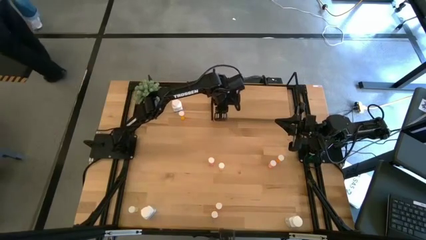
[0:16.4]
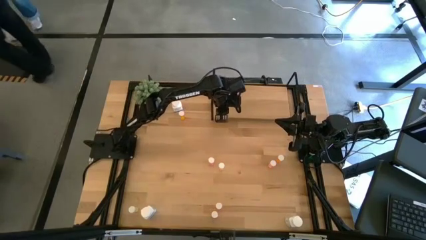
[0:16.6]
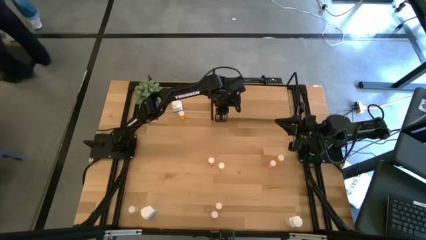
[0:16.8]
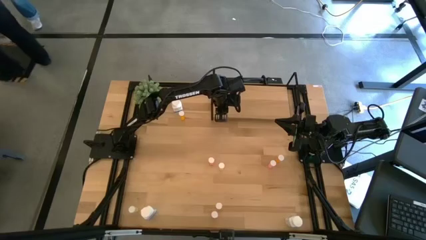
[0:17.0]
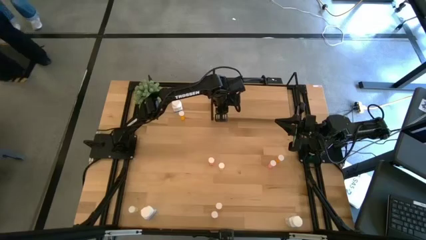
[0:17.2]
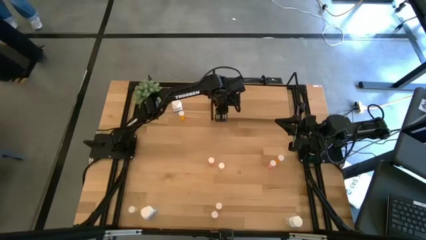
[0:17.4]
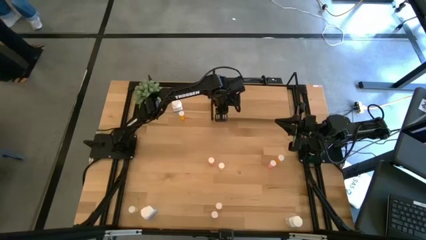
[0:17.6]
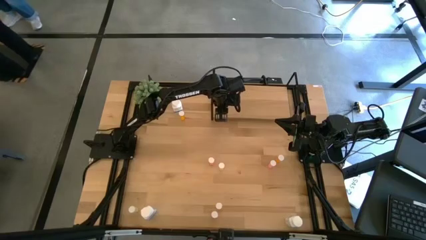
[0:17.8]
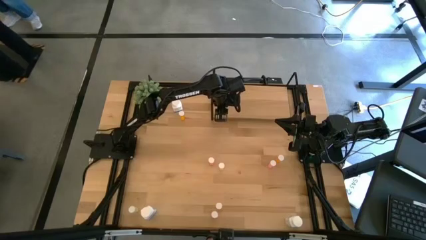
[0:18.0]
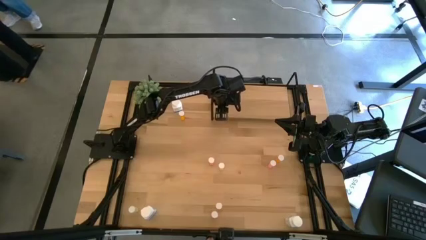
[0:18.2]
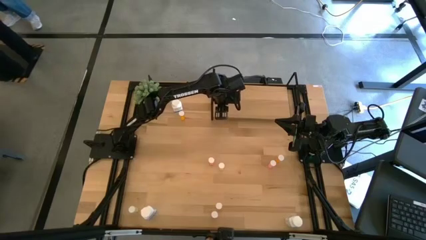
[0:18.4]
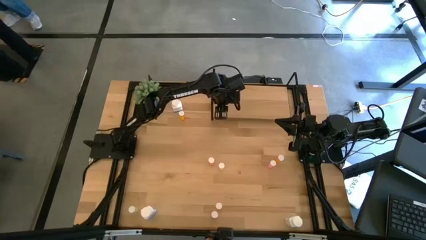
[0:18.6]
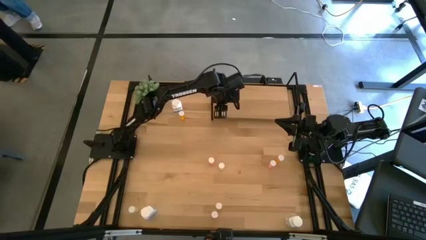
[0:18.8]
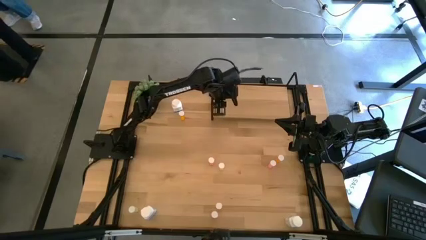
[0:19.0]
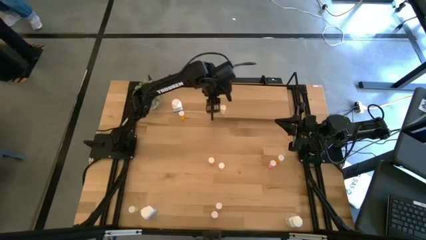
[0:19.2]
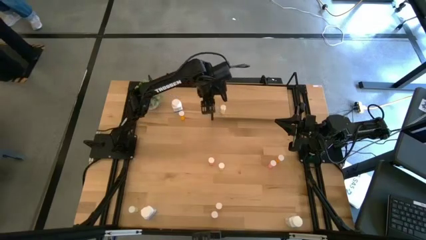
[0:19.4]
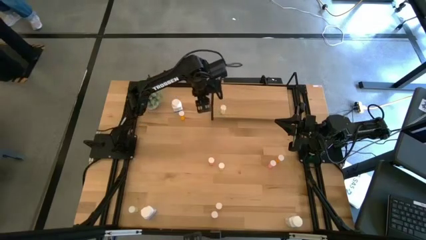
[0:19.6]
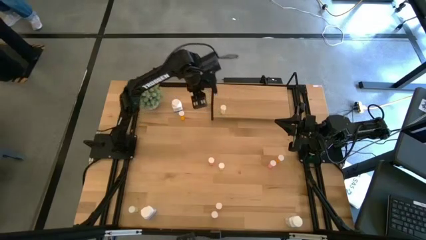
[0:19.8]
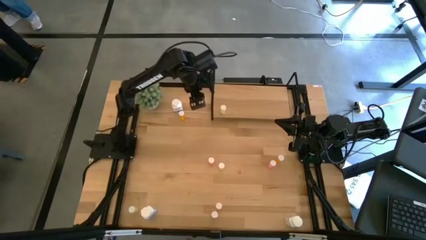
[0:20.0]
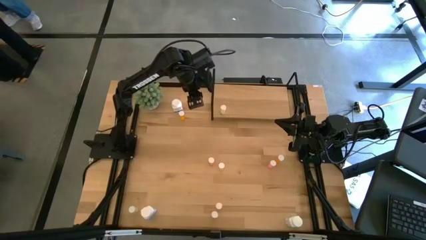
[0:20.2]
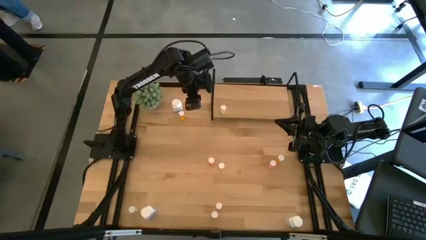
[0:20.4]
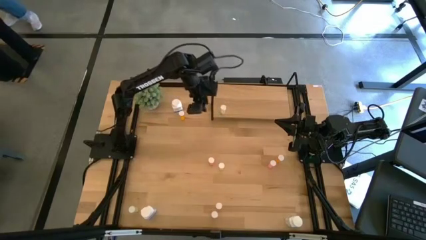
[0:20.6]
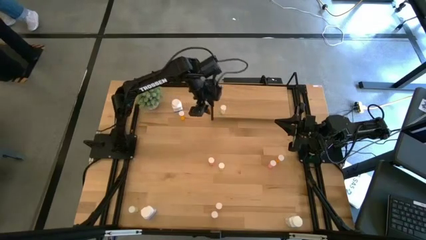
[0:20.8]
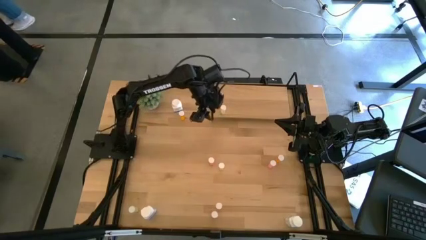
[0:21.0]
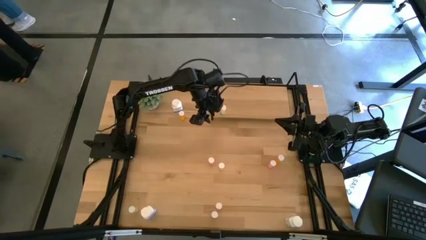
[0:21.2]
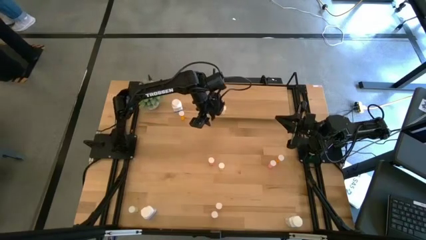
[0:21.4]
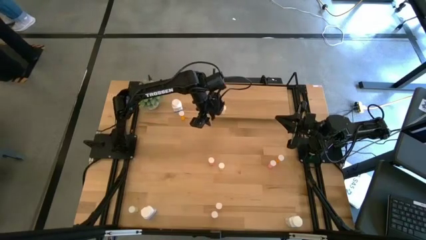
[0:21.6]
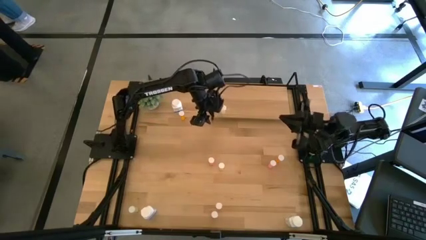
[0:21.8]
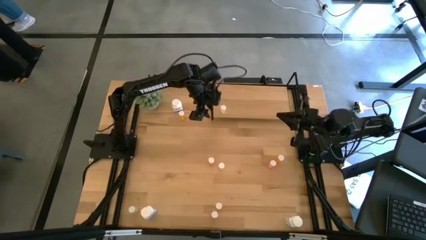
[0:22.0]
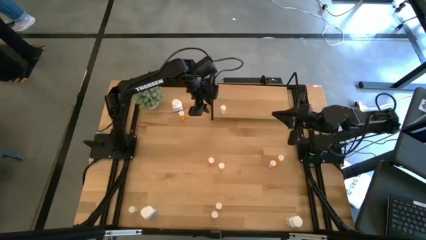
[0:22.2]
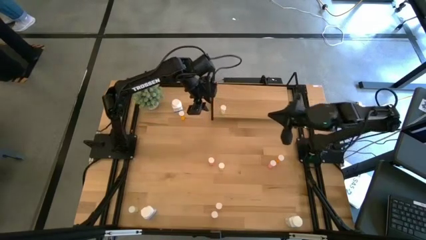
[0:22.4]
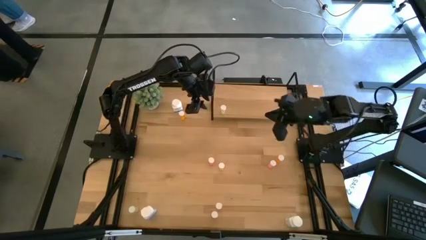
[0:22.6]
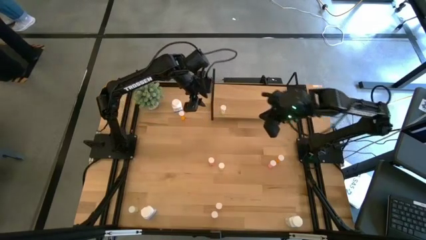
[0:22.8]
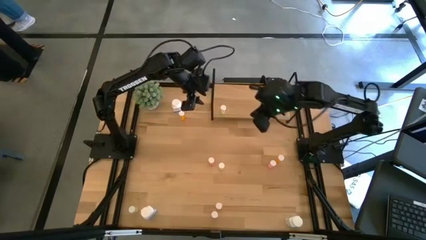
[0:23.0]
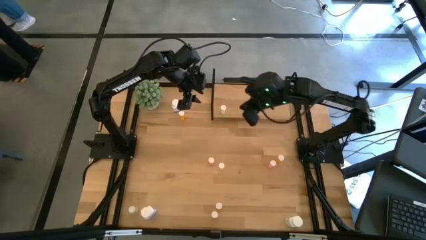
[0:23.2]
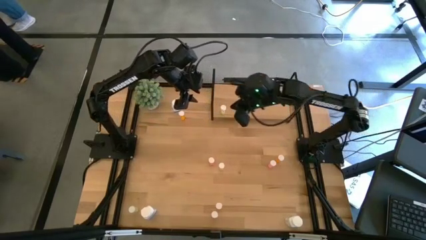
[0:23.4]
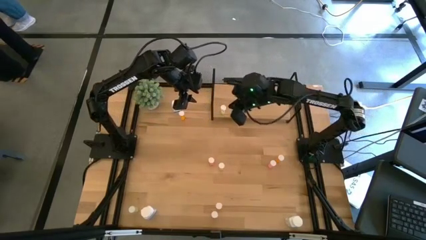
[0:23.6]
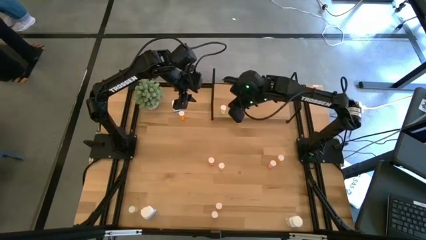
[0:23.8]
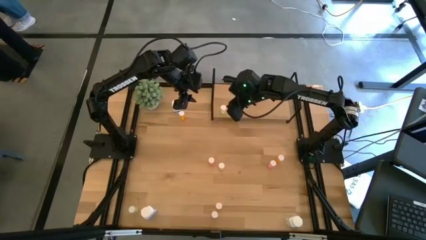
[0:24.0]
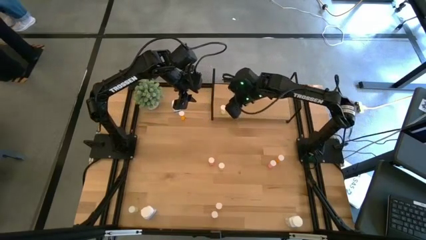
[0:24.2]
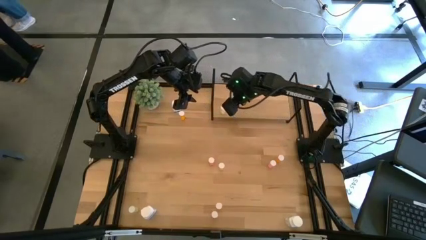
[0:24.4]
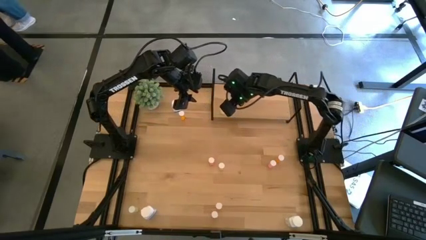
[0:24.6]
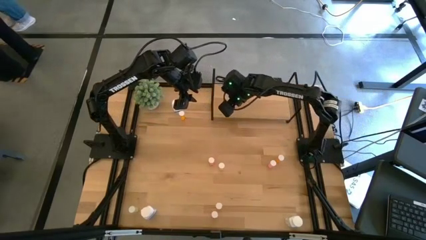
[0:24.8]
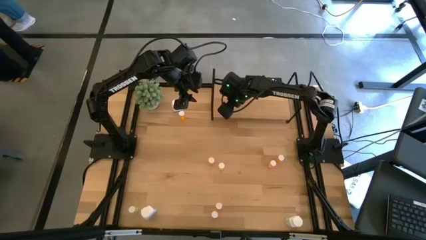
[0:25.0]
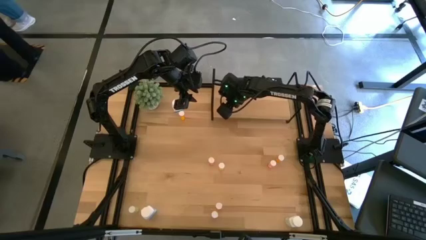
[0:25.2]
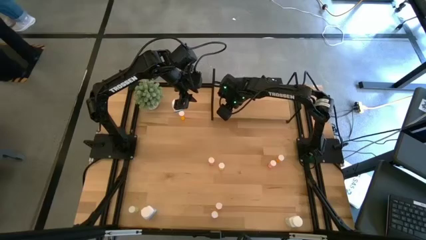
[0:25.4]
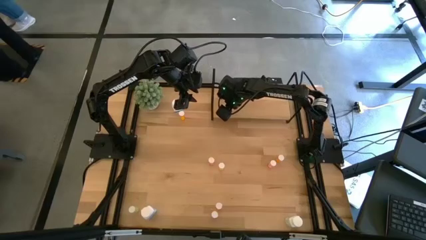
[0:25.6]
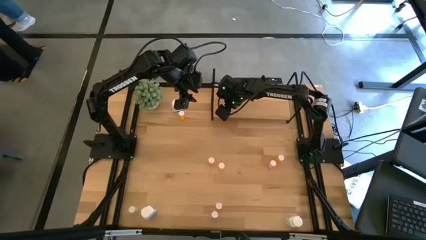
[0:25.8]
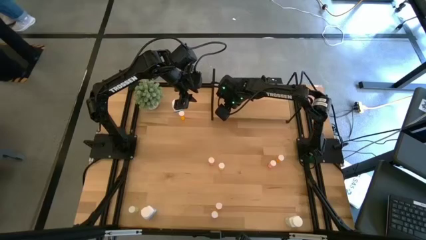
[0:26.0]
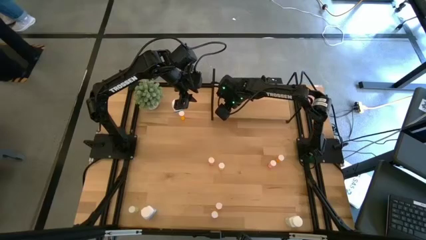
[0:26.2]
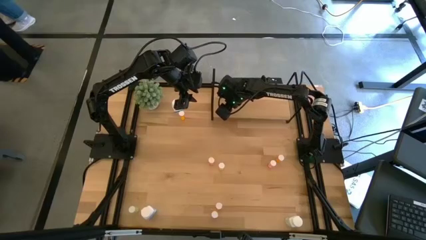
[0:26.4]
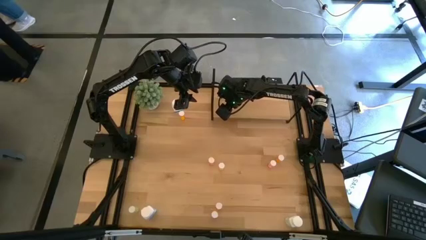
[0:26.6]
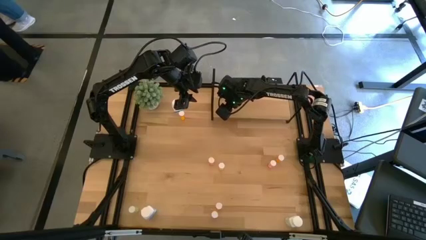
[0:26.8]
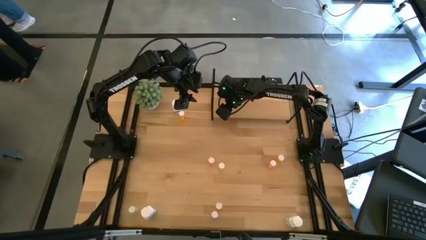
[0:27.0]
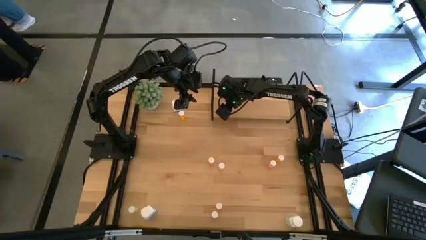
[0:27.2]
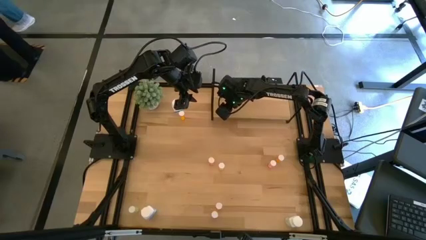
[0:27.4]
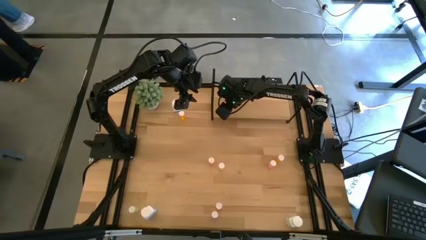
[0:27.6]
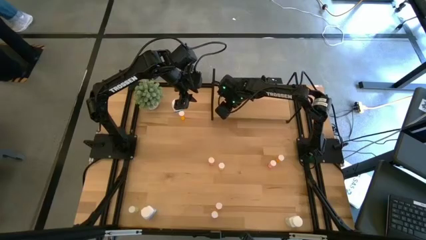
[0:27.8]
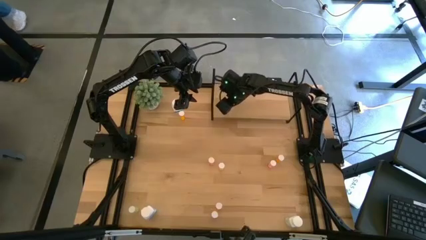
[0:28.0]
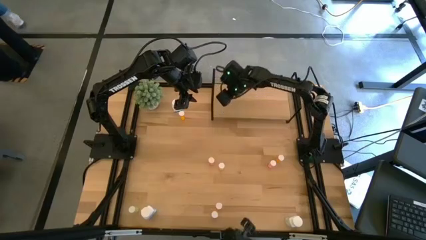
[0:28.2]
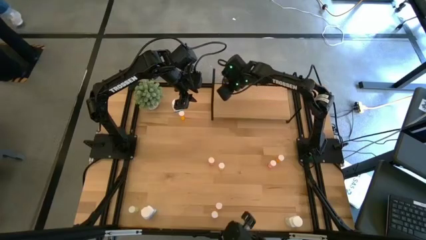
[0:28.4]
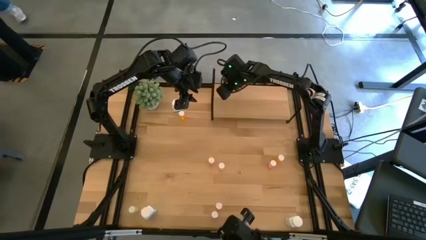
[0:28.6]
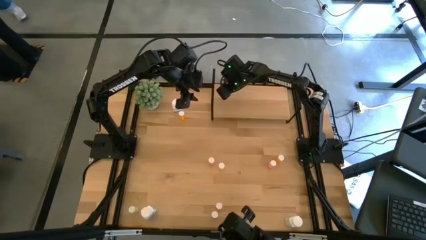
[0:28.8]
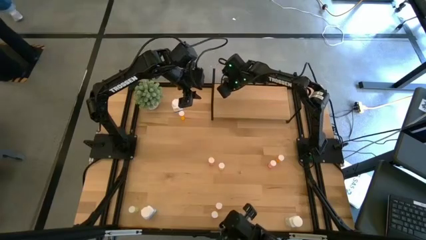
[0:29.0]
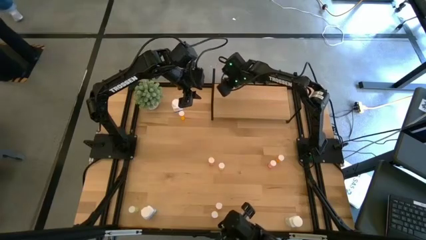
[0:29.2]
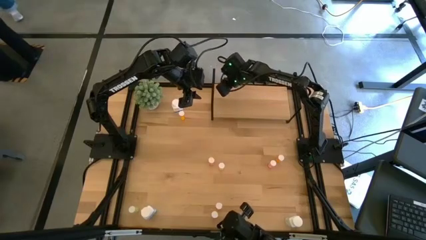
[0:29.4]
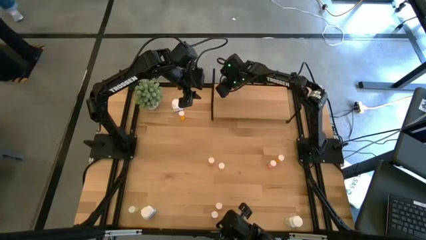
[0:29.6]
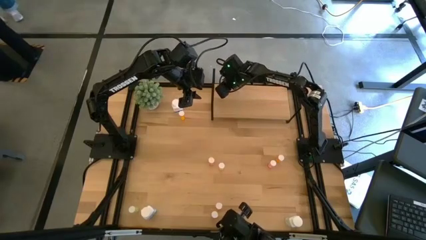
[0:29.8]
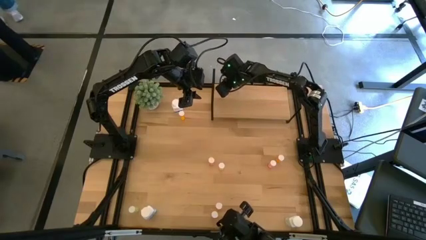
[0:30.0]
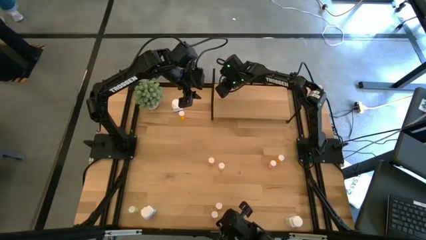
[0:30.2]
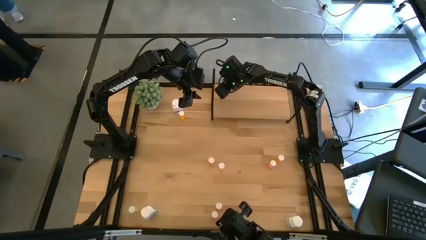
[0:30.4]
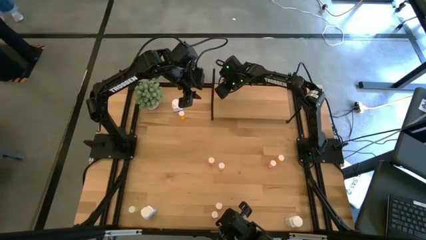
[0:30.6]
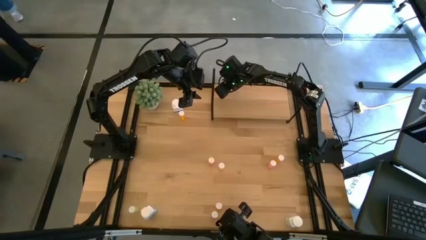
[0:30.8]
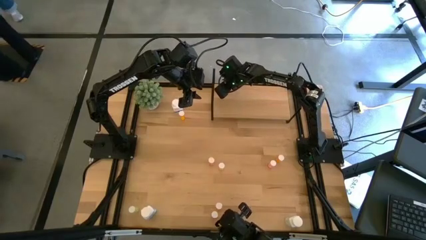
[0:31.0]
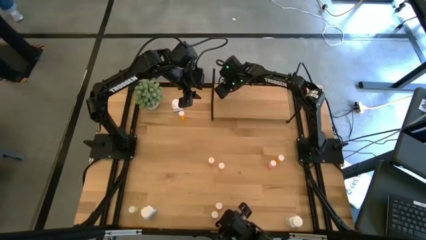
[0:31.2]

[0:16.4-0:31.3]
Task: Pick and place medicine bottles onto shelf by color
Put the top left yellow pill bottle on the shelf

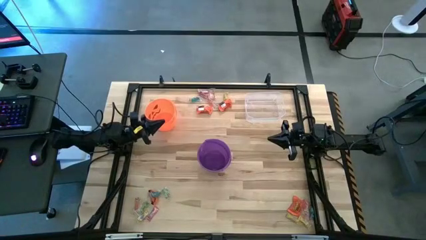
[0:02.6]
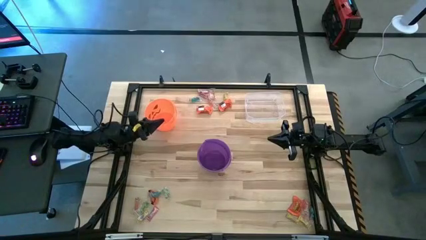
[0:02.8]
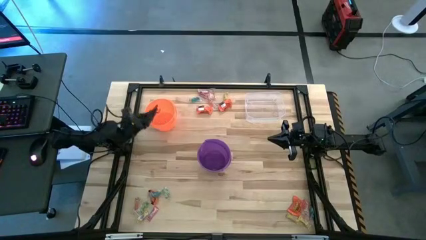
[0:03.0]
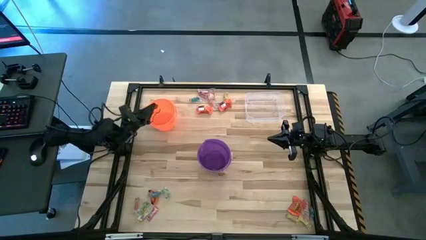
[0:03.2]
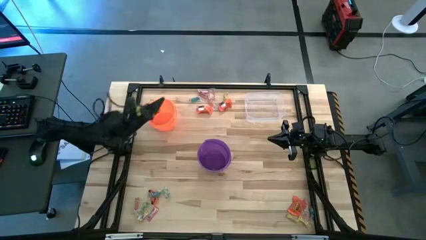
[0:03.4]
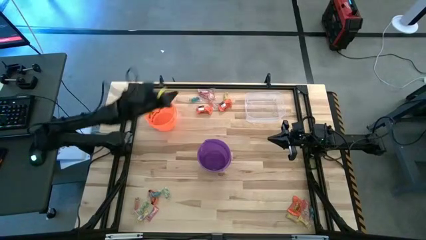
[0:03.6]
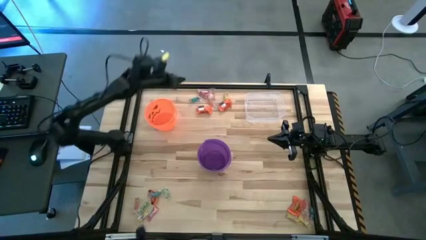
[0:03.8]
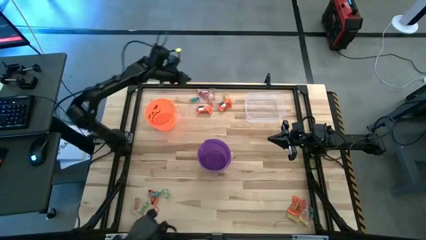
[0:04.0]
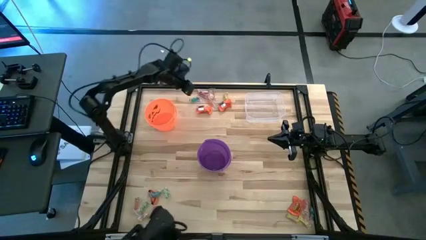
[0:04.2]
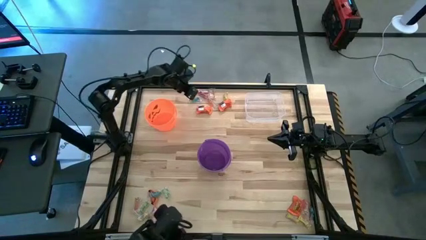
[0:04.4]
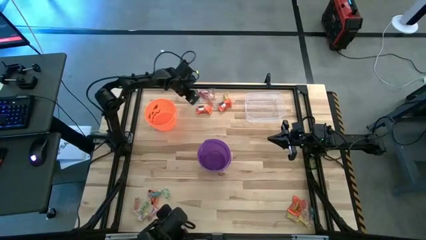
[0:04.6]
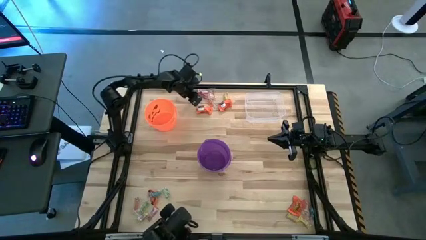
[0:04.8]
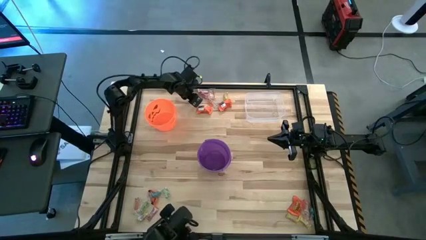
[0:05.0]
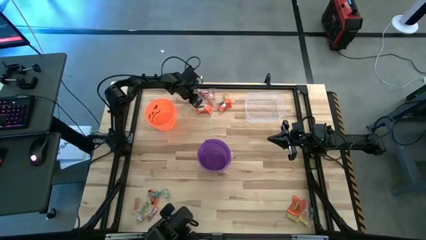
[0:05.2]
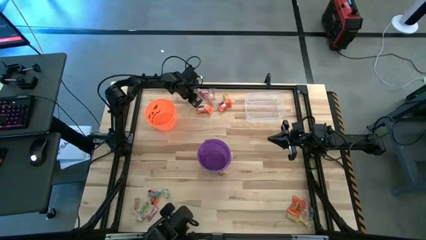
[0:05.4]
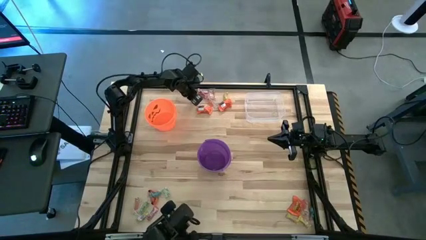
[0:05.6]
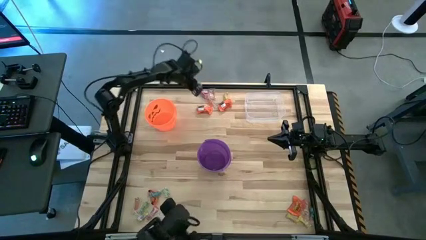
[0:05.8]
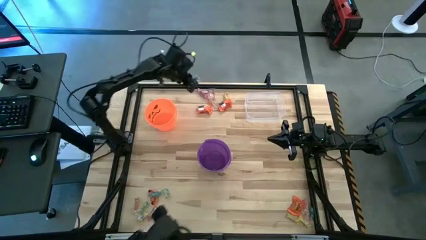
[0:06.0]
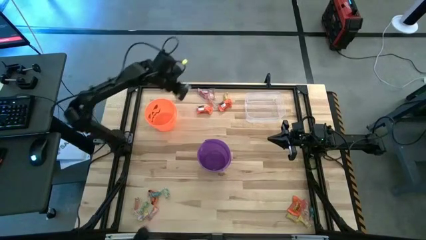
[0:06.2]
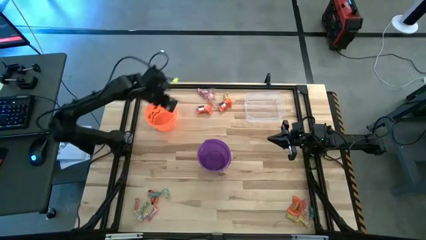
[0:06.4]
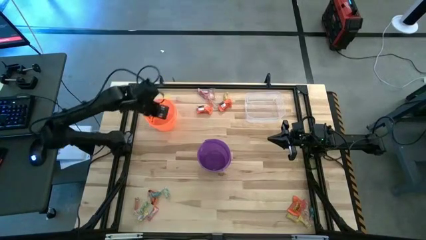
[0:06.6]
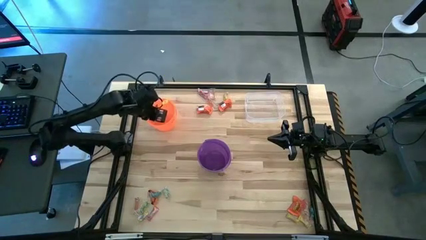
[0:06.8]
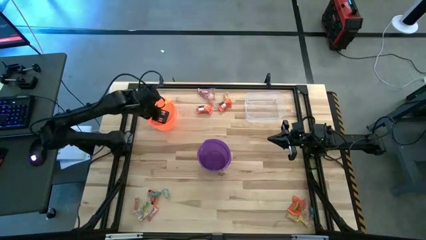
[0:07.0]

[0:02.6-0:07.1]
Task: Sort candy by brand, put in halloween buckets
Put the blue gummy into the orange bucket
